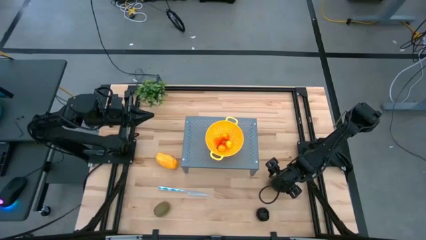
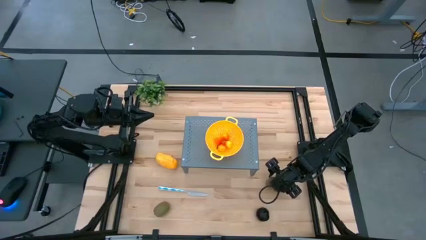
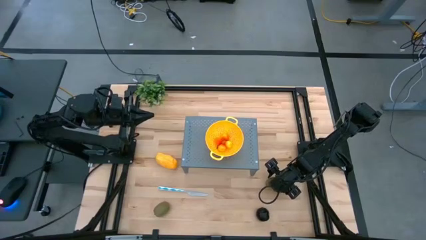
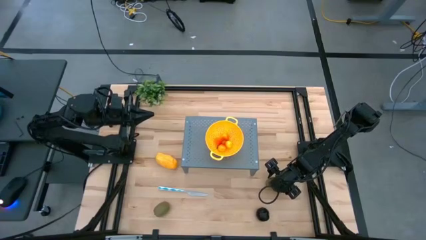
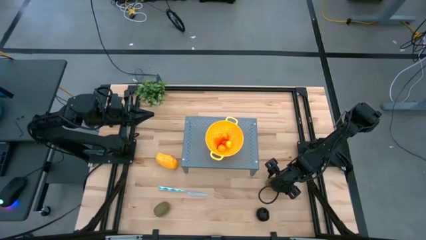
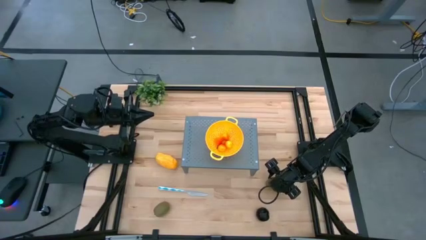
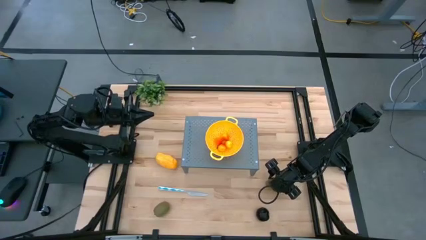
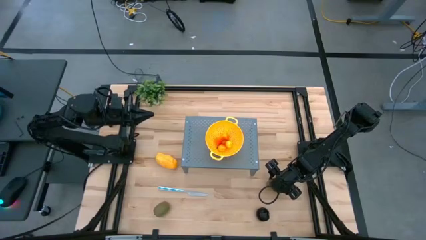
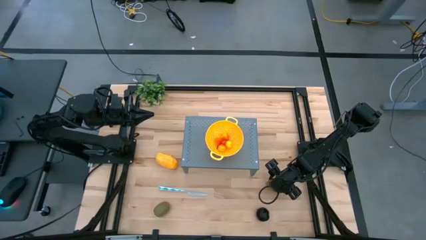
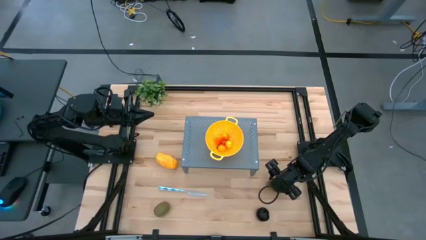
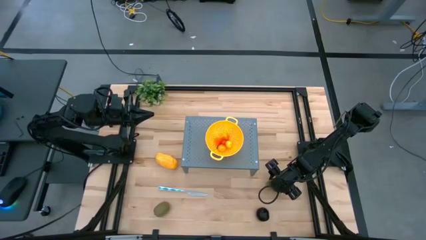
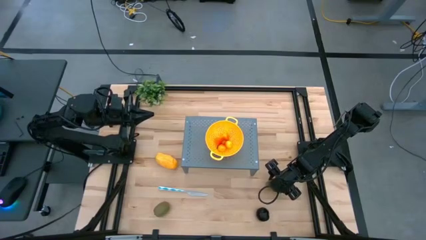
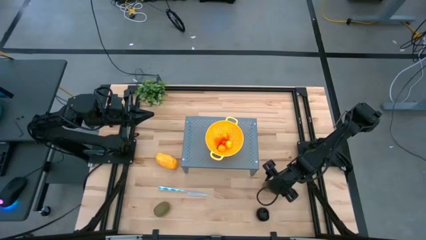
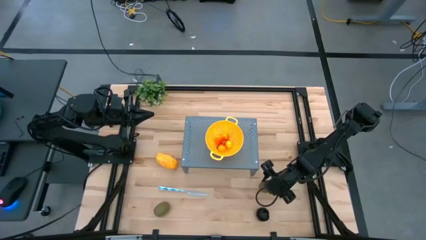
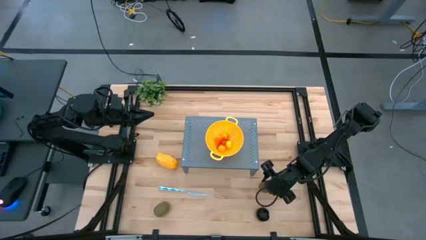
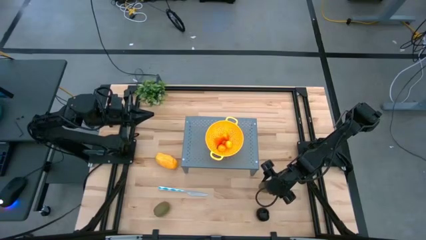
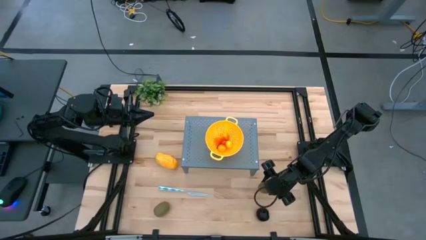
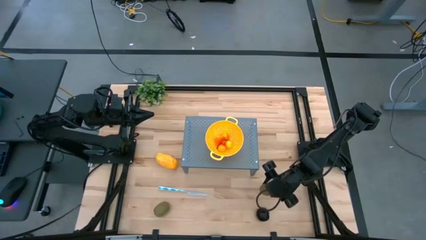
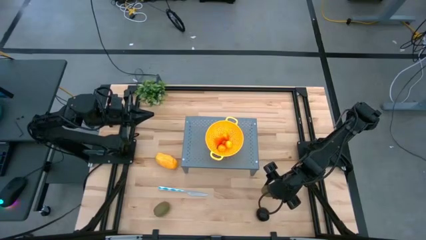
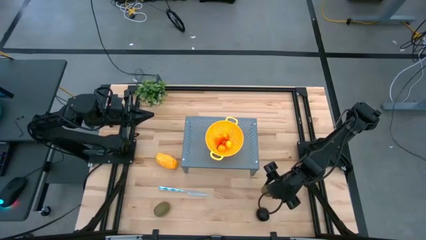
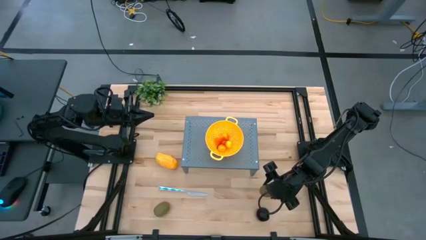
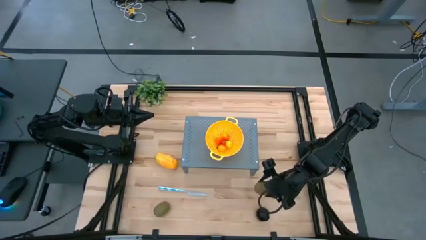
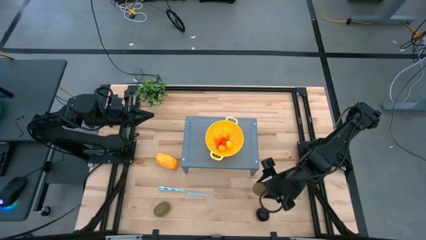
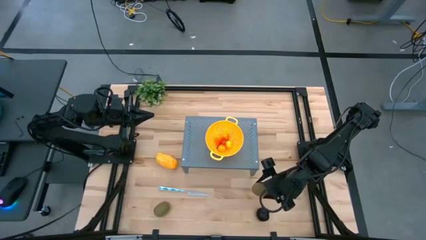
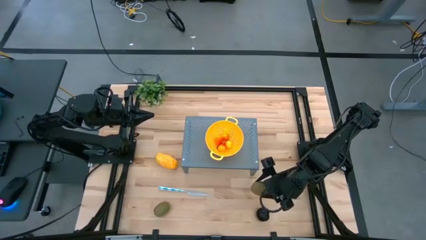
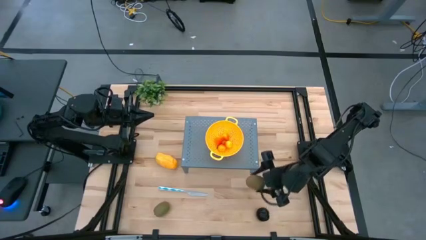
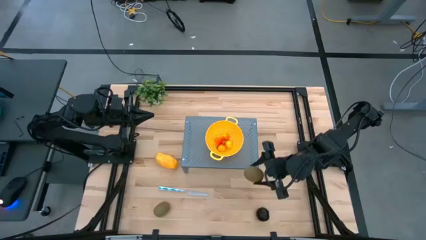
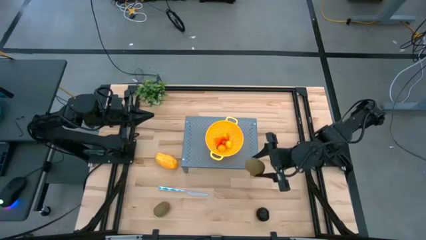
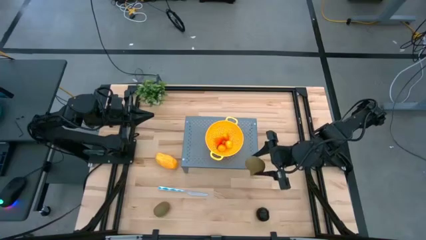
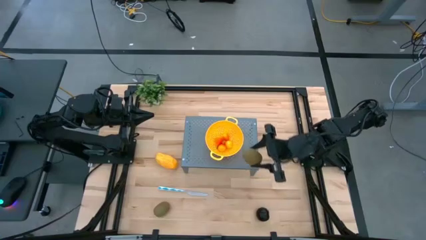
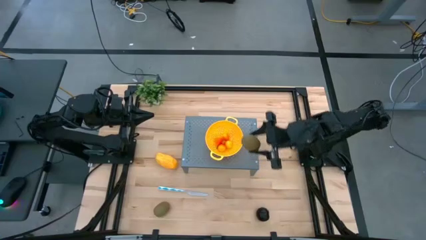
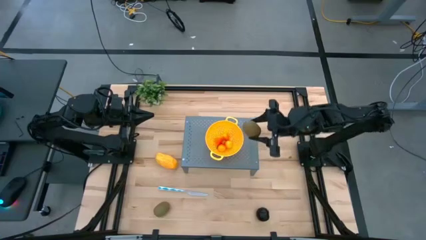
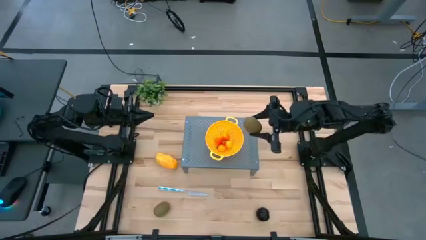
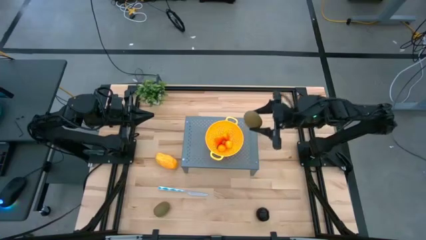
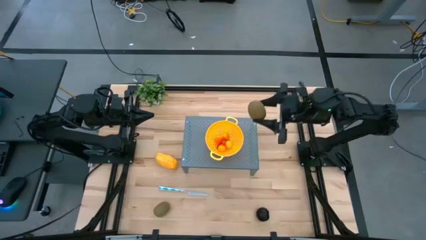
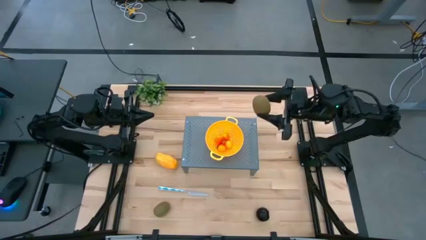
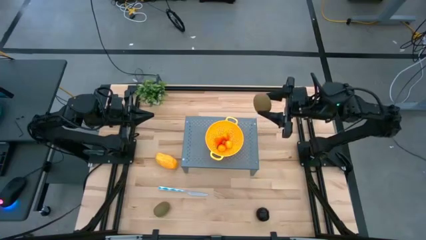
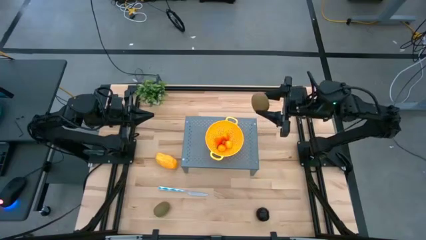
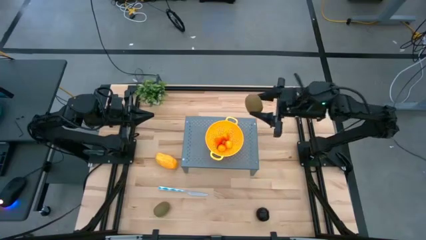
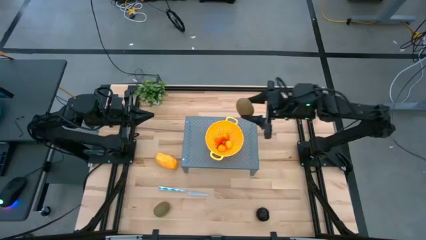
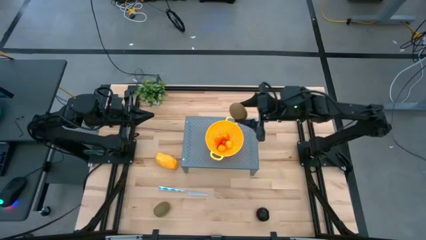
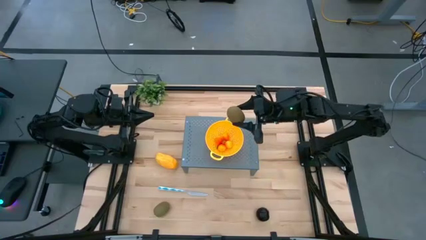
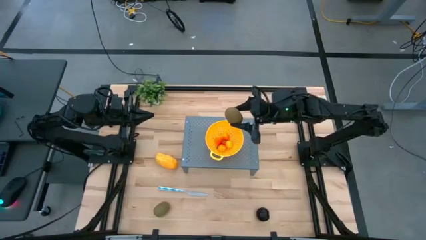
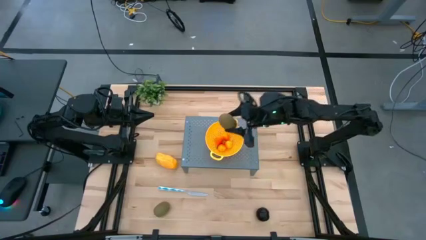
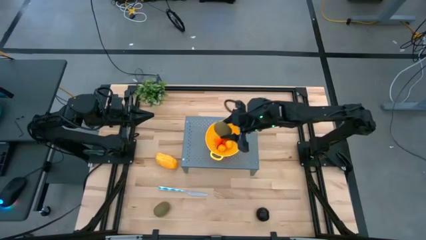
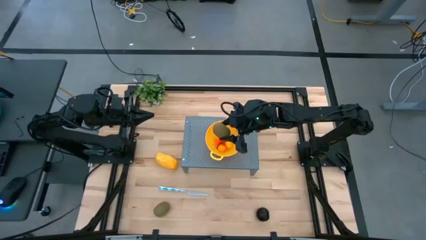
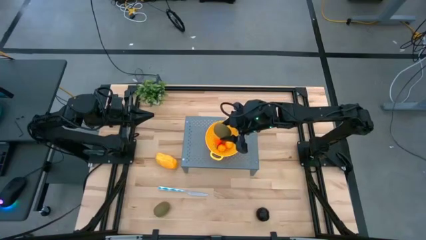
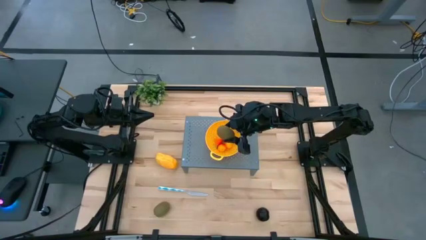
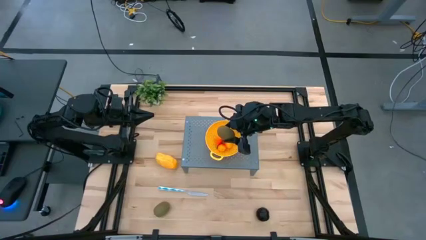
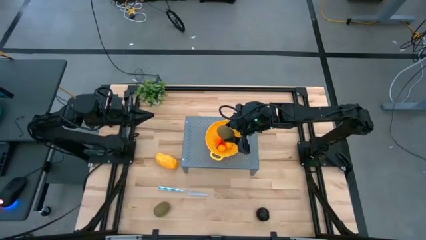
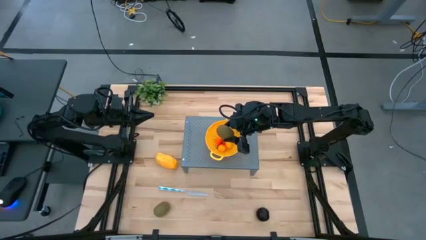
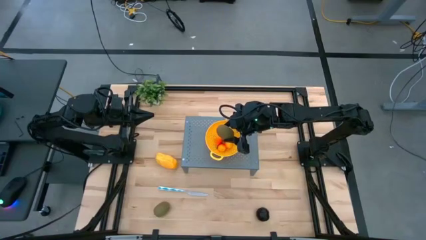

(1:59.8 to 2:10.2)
Task: Pick & Place Fruit
Put the right kiwi into the strainer bowl on the shelf

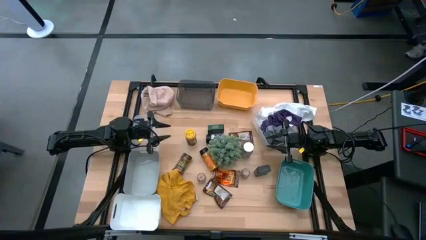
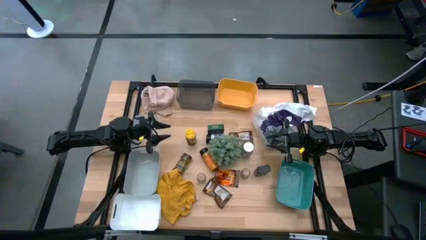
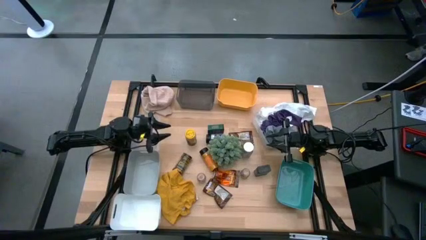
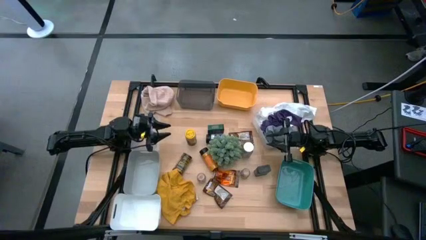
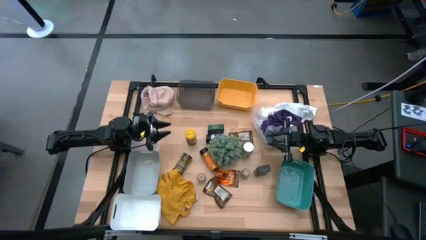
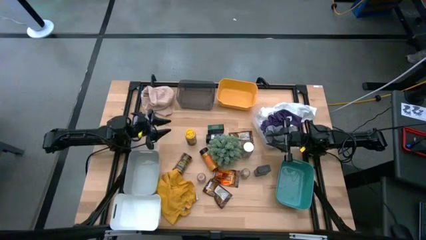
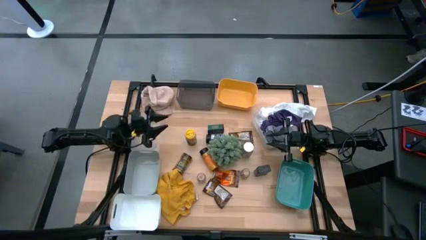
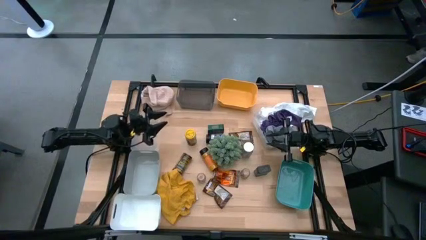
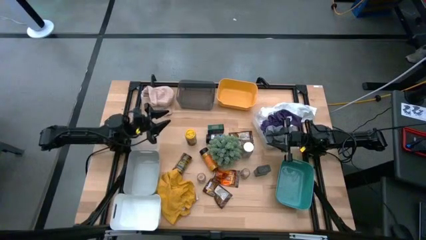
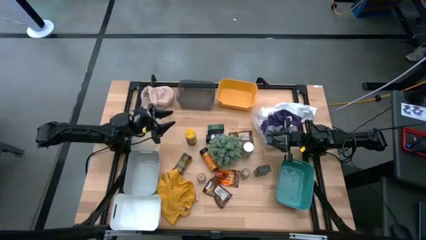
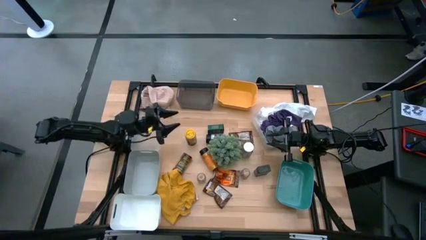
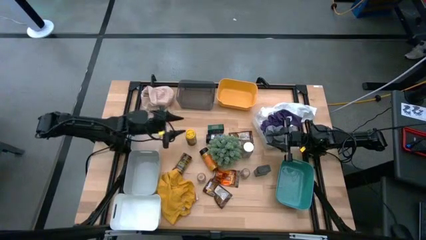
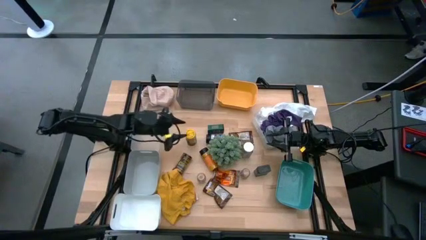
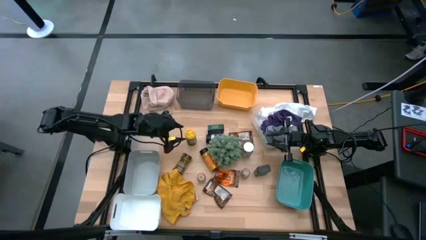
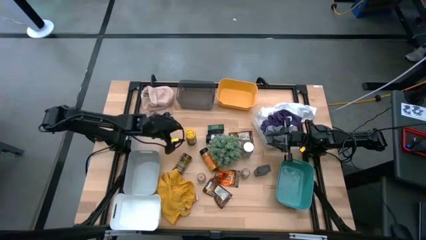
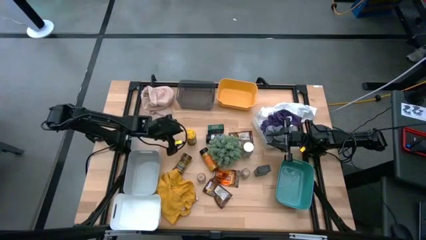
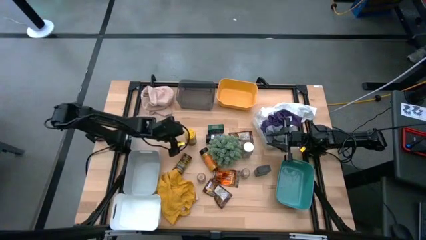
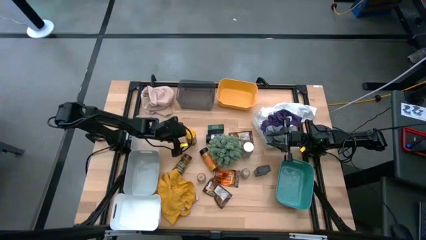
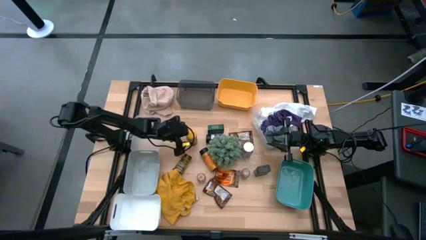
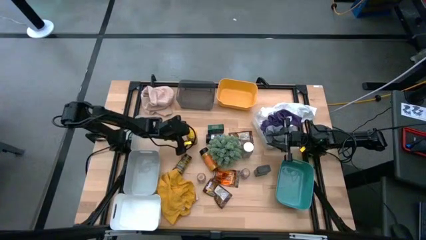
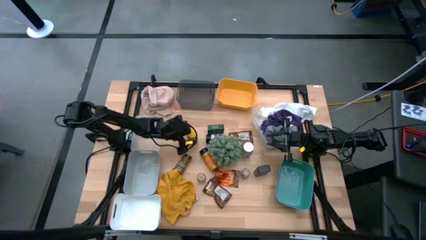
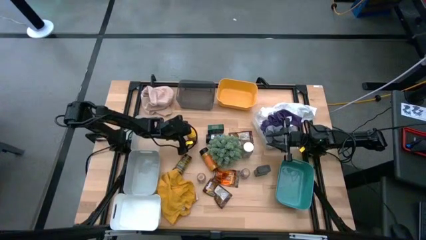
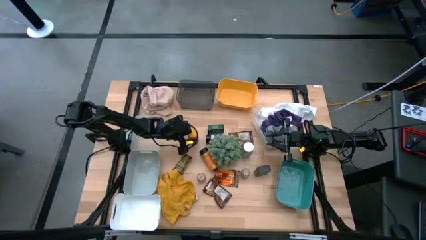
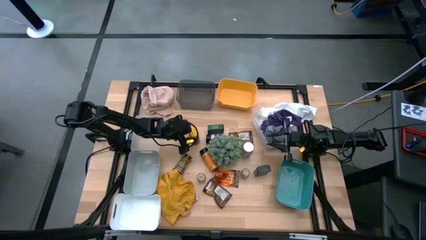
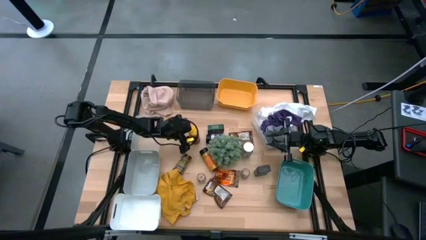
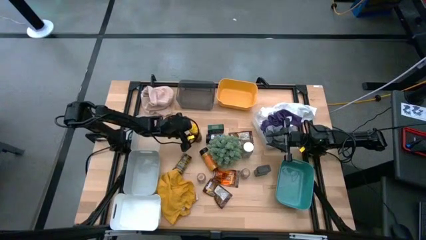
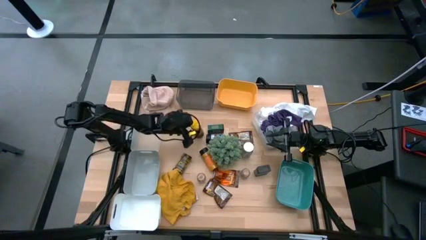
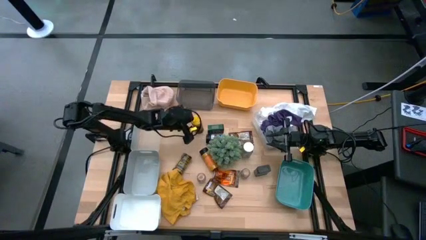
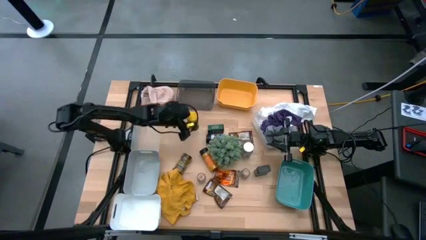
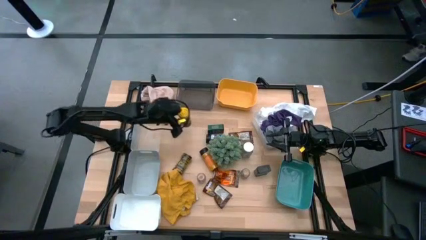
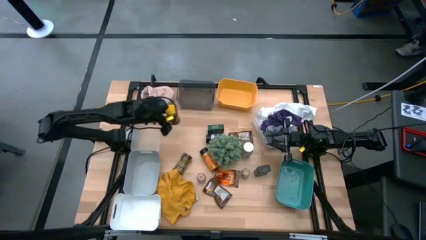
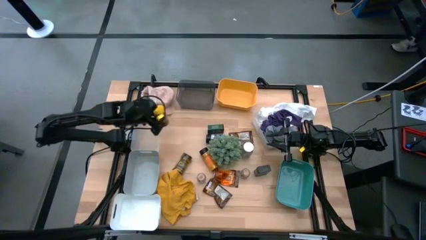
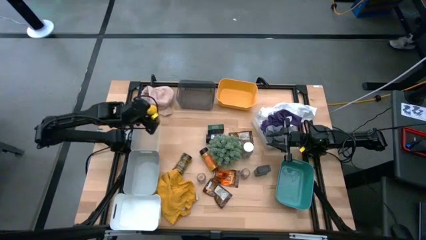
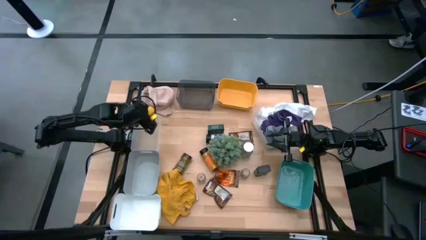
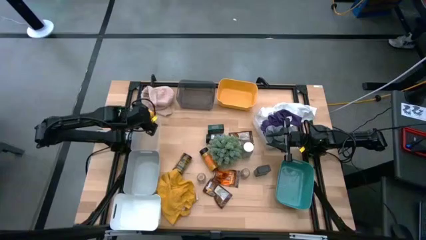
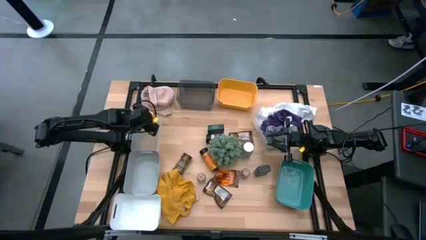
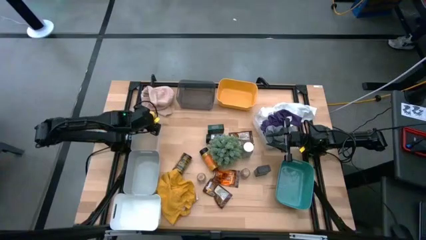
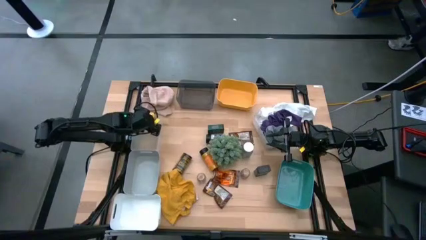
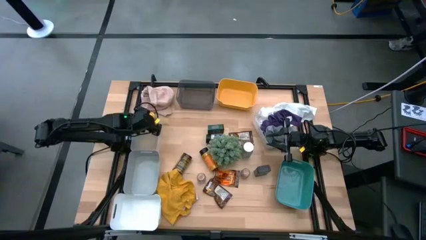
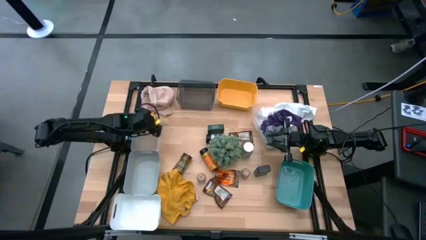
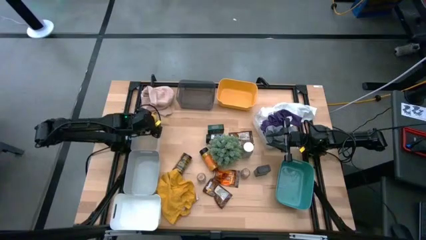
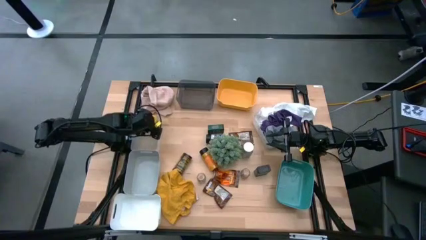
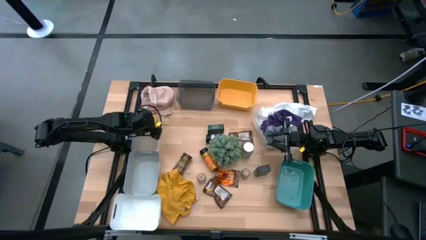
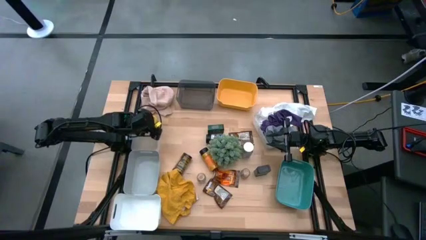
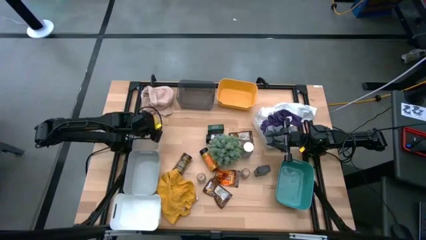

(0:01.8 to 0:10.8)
Task: Sort spices by type
Put the yellow spice bottle into the transparent bin
